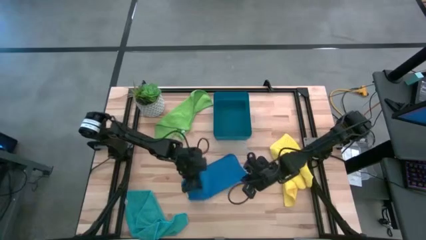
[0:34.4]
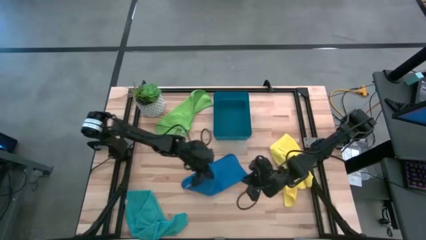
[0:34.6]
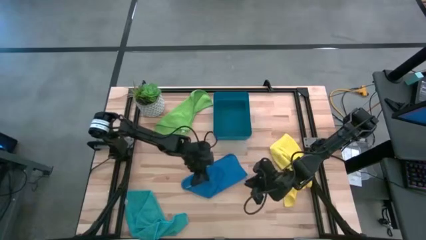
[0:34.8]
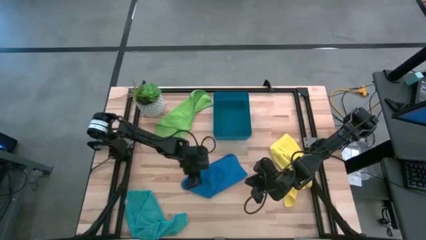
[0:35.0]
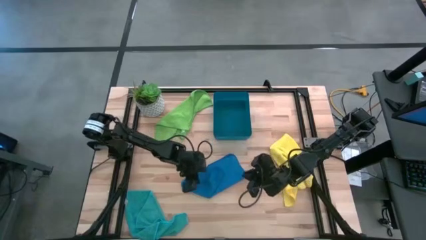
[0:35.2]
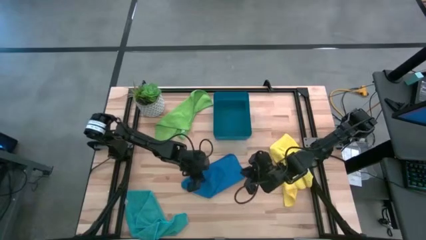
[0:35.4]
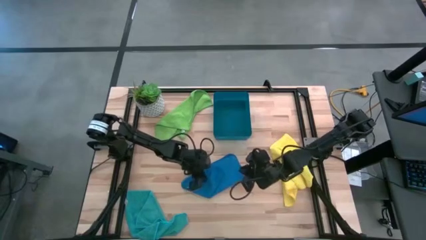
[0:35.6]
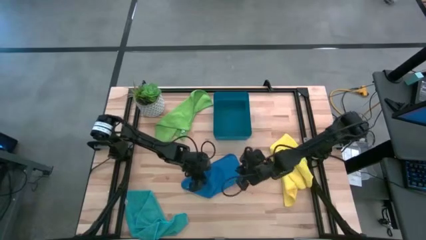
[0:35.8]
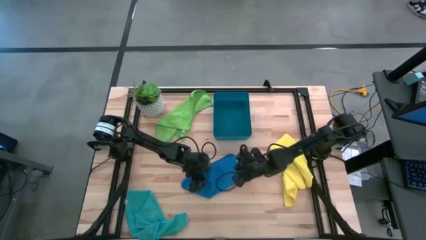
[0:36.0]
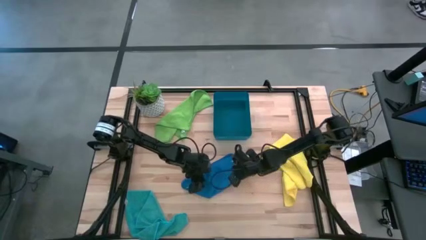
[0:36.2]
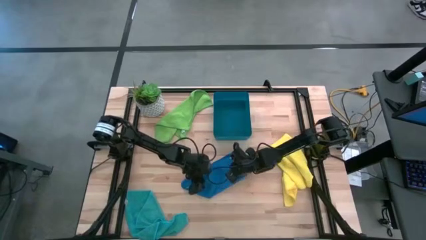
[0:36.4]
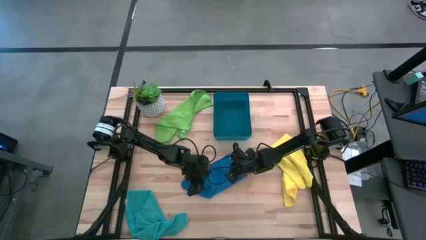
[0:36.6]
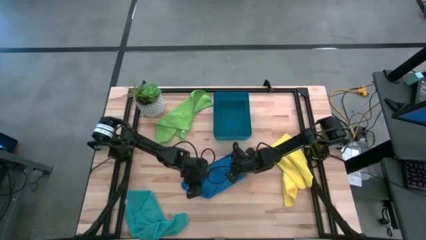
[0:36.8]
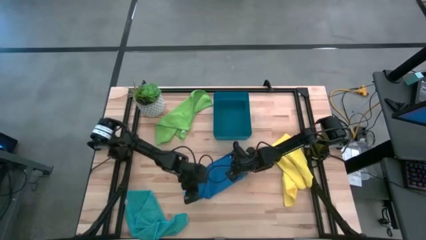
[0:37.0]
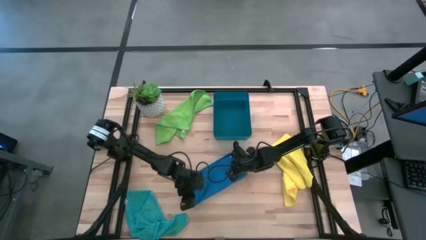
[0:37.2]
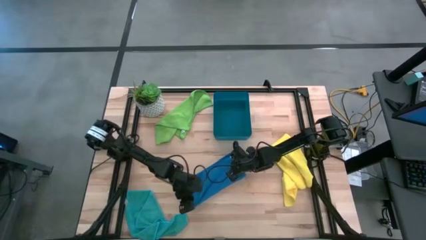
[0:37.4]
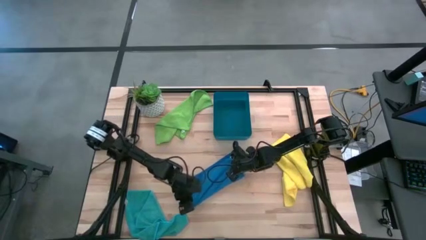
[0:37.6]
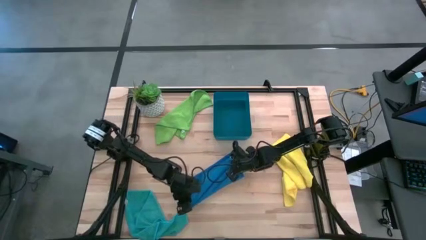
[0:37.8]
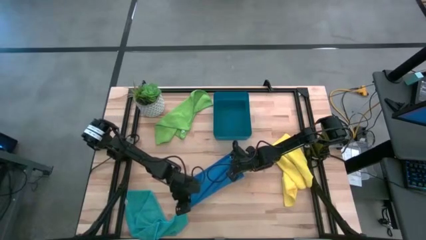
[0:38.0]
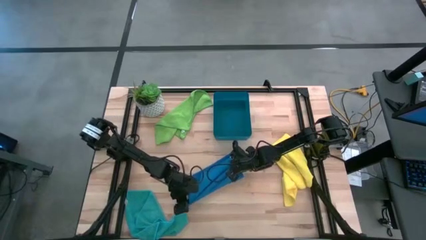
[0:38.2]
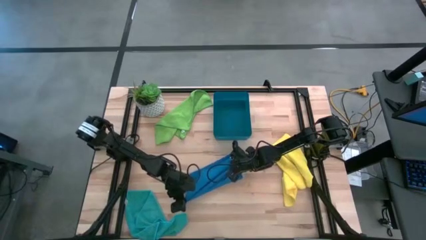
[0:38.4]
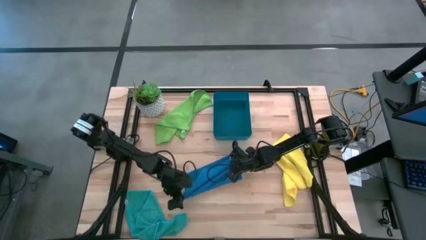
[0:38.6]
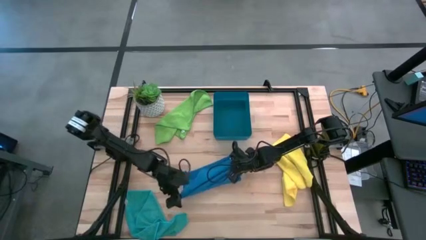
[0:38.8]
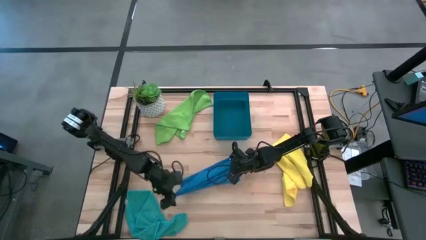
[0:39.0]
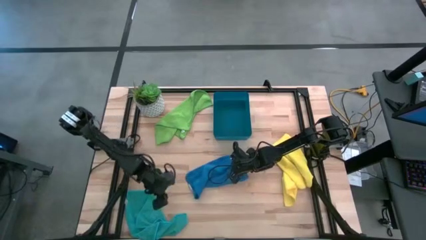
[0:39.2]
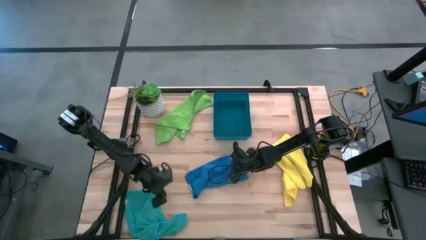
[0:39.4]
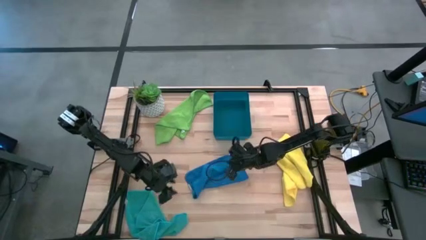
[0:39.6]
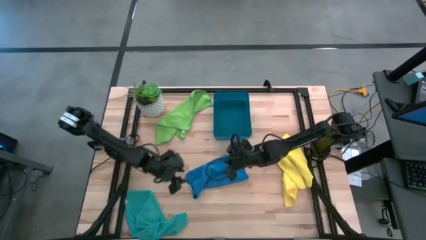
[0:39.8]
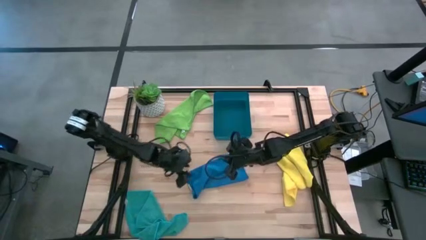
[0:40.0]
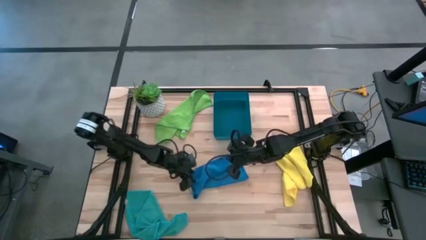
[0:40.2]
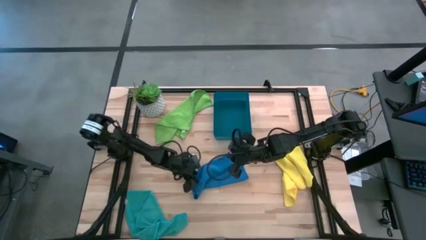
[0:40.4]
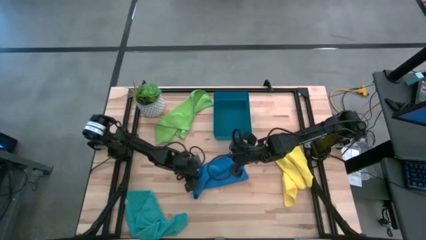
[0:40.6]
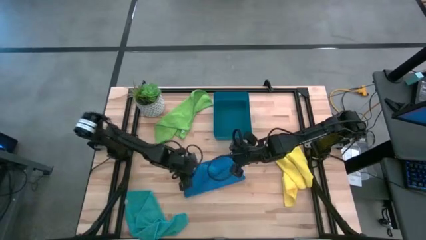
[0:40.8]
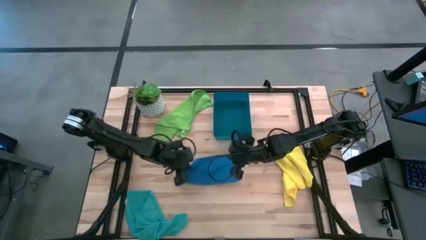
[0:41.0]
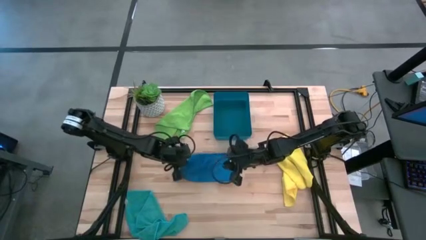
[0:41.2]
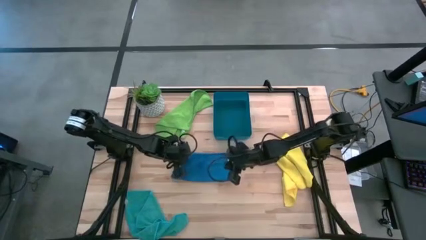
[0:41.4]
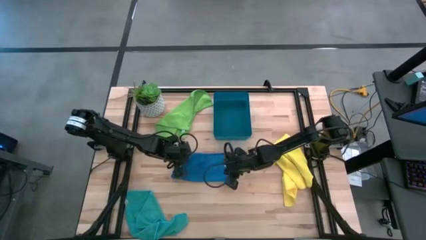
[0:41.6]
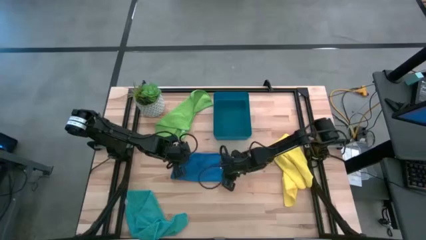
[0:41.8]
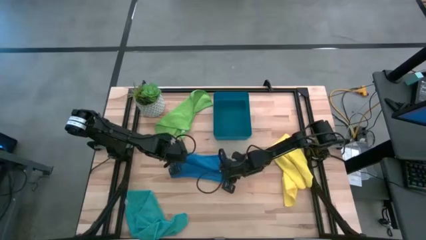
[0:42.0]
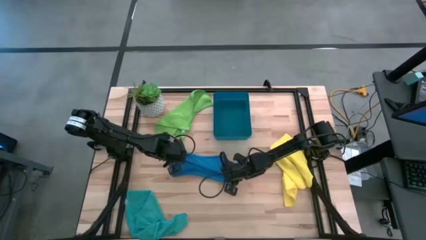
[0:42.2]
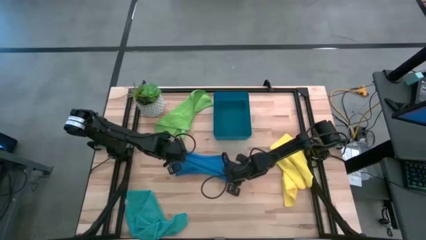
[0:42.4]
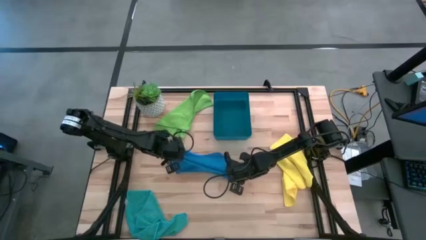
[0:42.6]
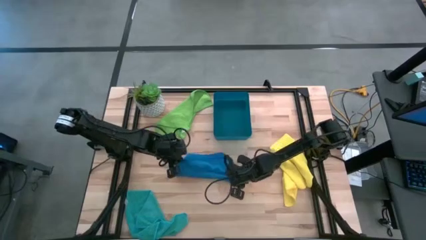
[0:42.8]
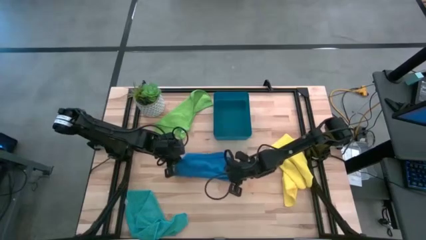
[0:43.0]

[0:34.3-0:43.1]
Task: Fold microfiber towels
Fold the blue microfiber cloth

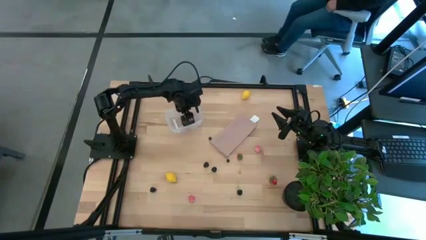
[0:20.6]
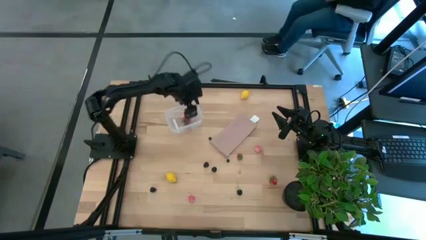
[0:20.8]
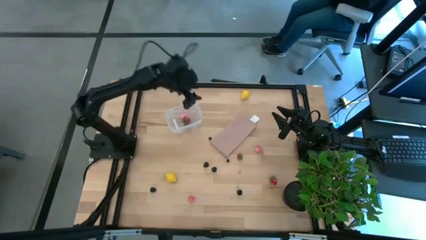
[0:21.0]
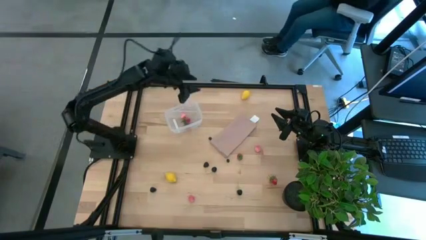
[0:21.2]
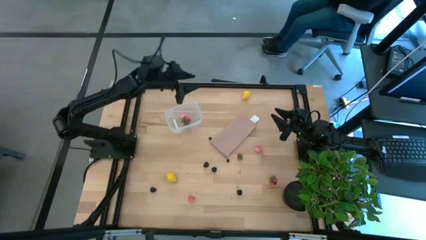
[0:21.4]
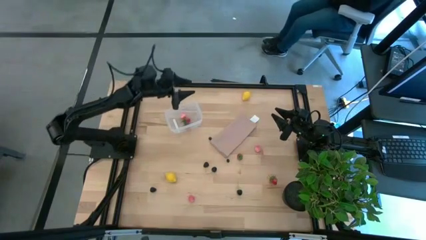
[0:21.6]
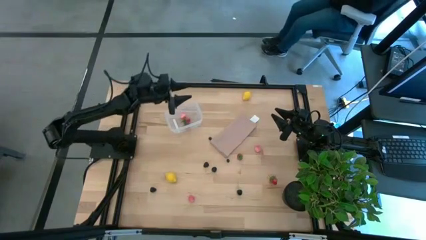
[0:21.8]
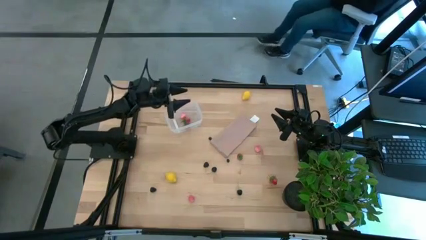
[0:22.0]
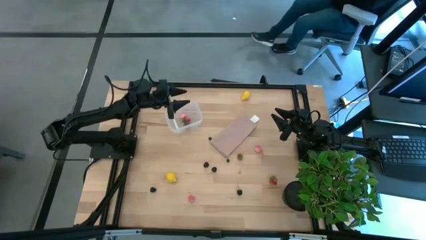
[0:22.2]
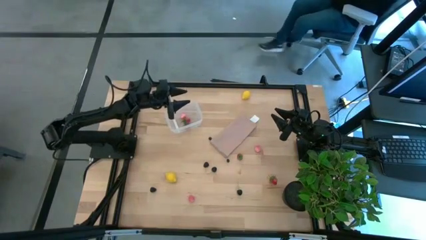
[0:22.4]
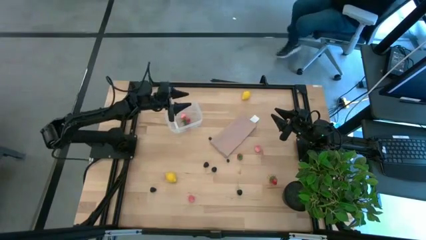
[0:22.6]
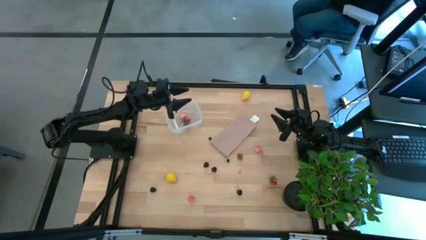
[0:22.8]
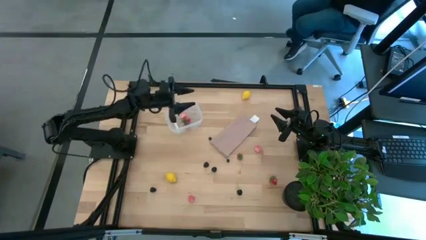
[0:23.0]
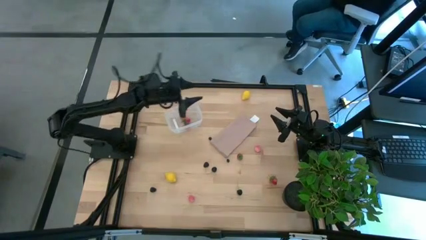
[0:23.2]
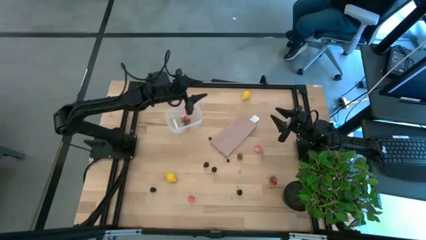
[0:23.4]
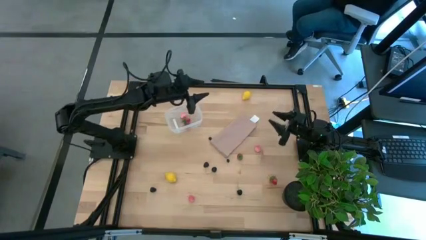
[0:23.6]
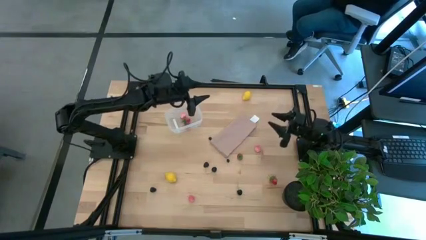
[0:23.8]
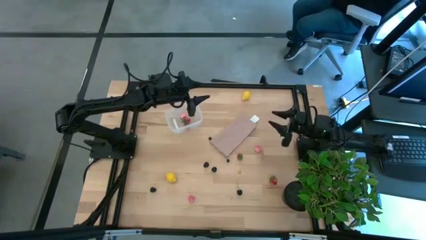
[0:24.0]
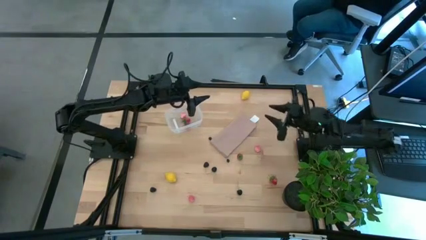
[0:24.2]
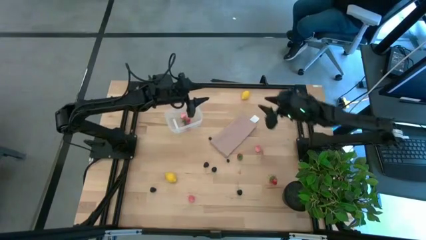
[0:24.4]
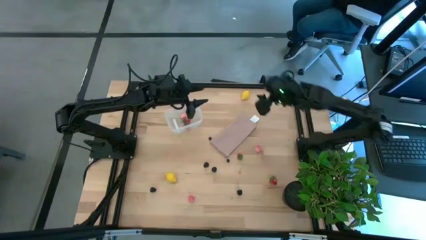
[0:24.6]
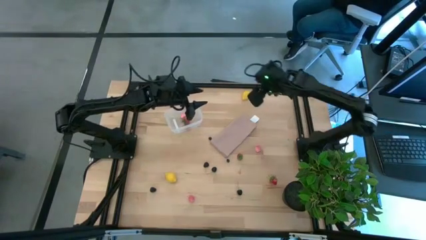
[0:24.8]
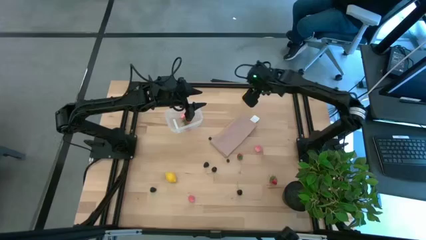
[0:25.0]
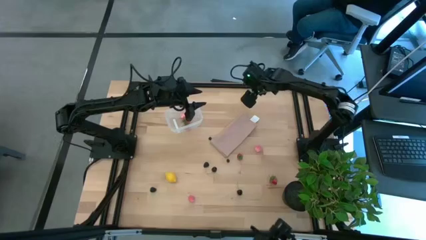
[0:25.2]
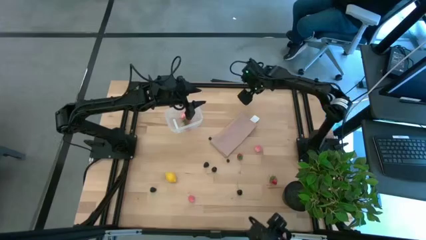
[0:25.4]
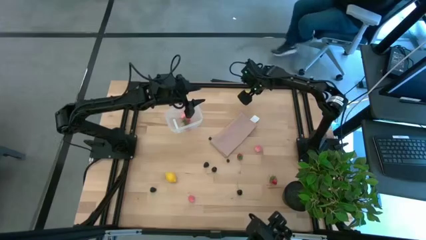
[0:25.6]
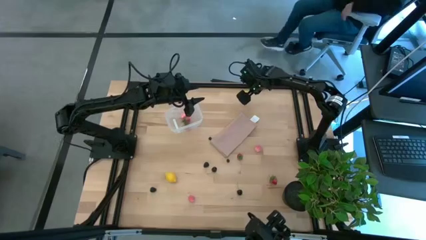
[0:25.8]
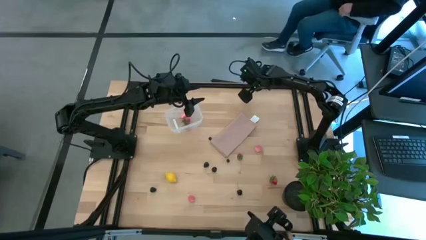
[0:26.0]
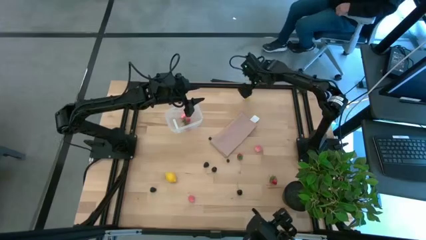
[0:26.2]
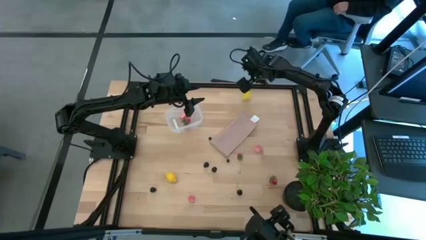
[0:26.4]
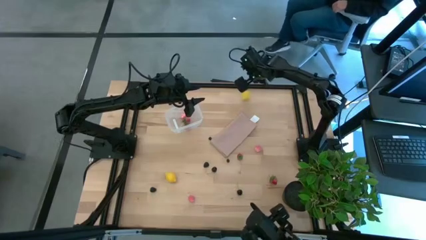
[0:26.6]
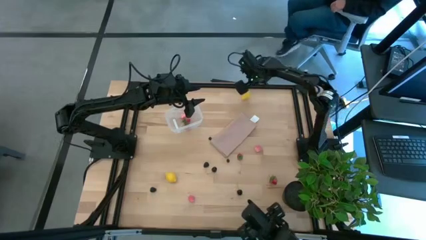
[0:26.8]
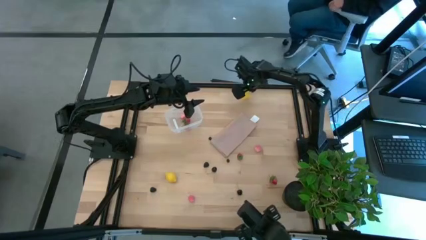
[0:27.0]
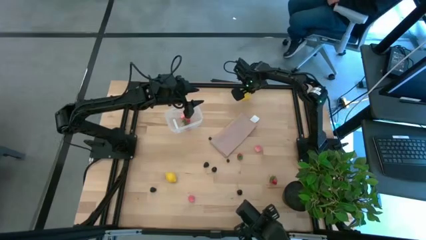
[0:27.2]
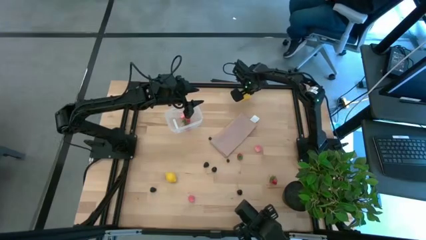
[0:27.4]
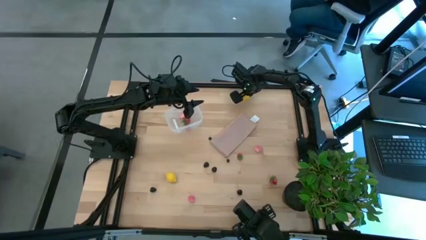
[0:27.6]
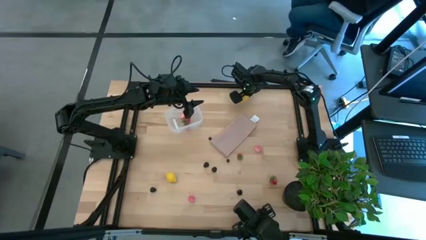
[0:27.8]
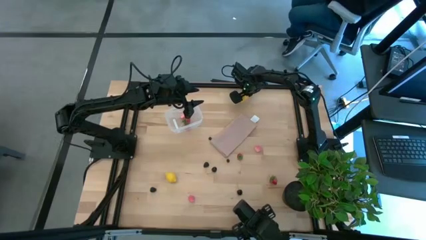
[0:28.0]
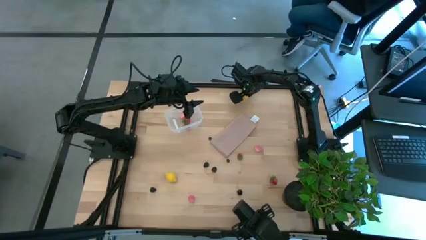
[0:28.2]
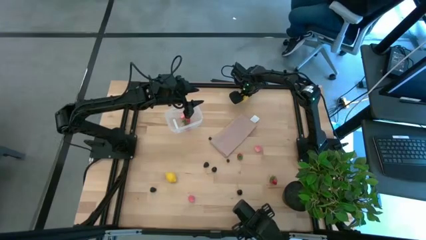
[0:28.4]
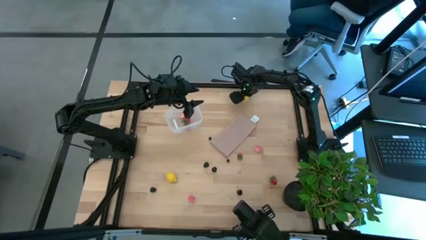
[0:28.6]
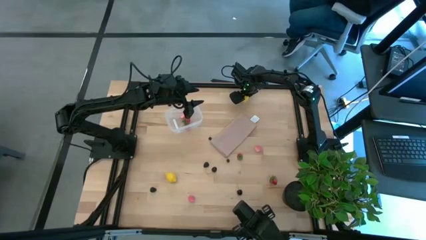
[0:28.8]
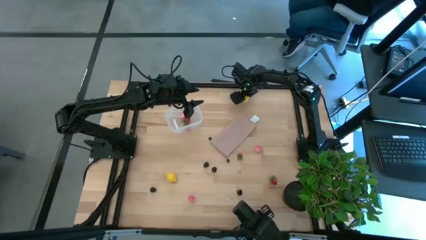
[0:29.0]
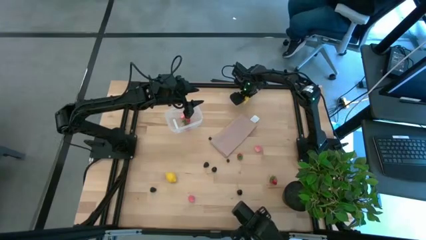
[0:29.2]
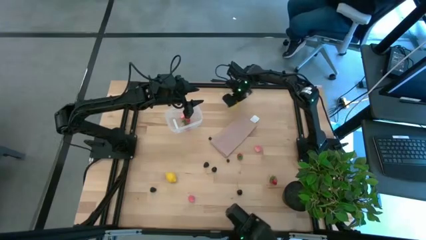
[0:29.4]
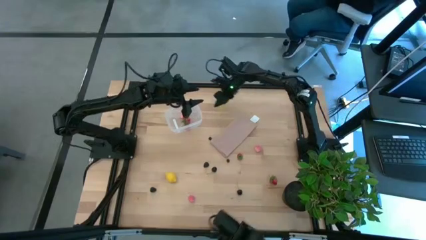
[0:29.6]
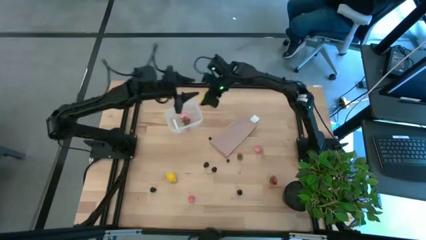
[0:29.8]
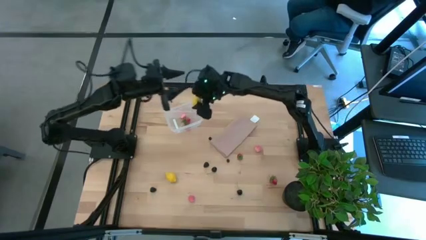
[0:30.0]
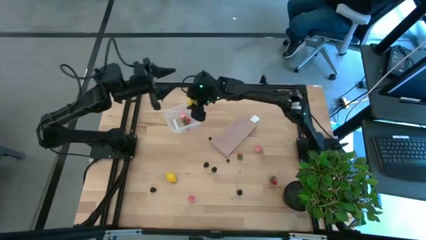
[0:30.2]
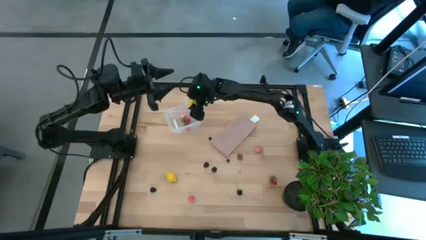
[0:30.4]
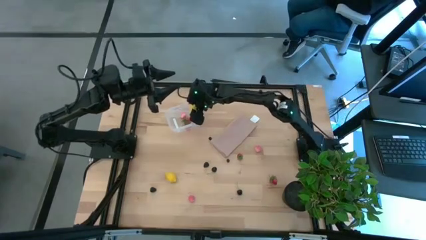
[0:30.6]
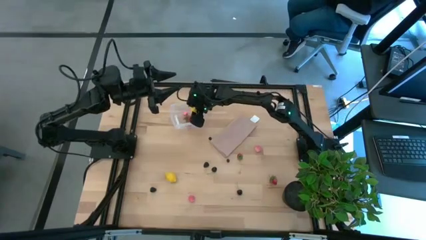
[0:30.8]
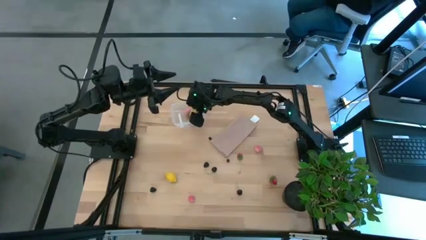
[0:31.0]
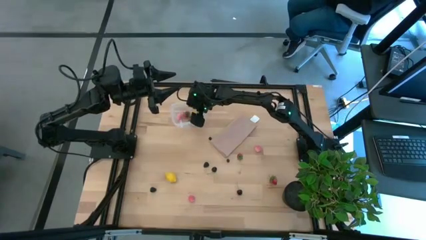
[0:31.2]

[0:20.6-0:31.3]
Task: Pick and placing Produce into tupperware
Put the lemon into the transparent bin
